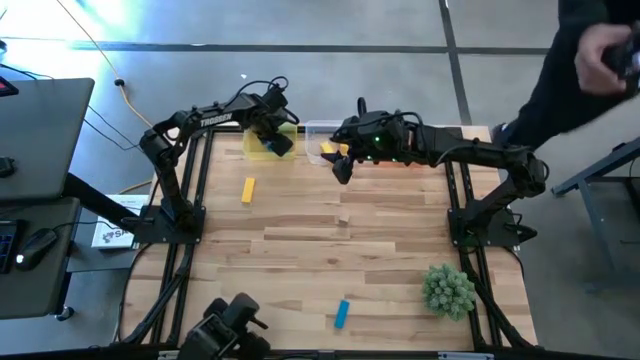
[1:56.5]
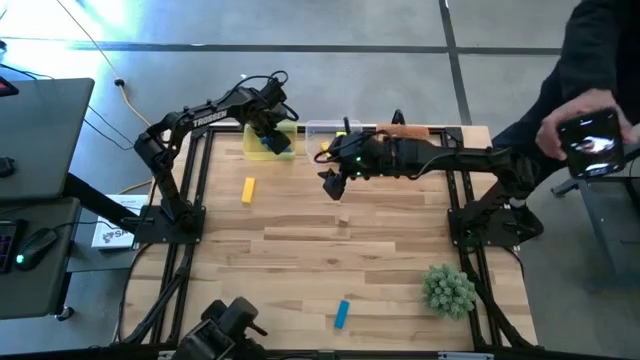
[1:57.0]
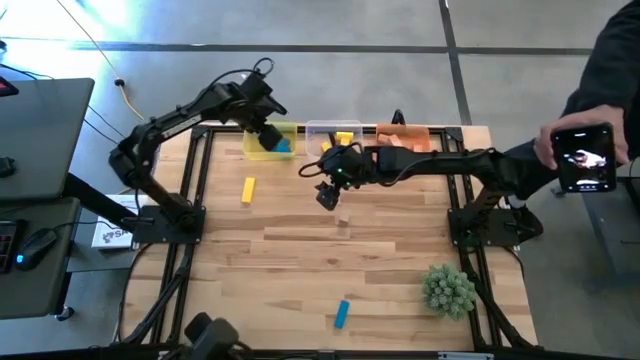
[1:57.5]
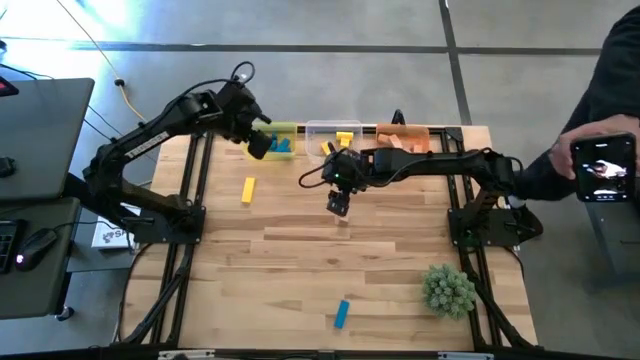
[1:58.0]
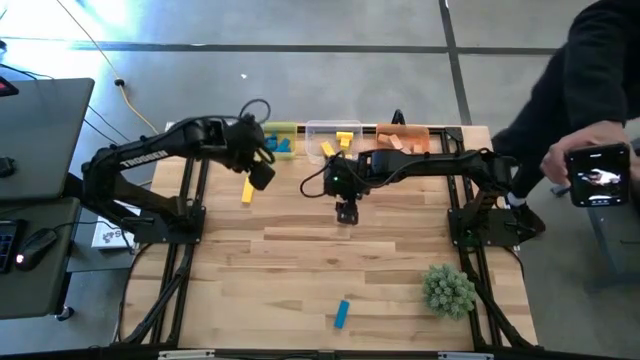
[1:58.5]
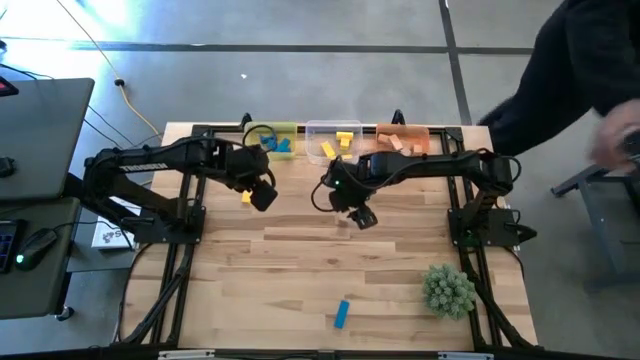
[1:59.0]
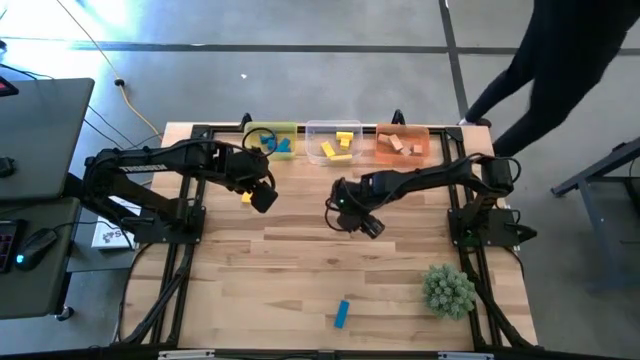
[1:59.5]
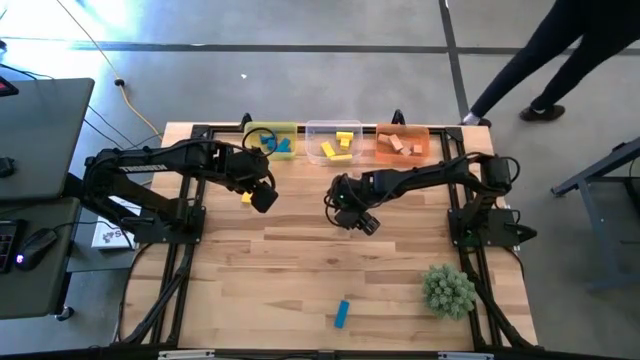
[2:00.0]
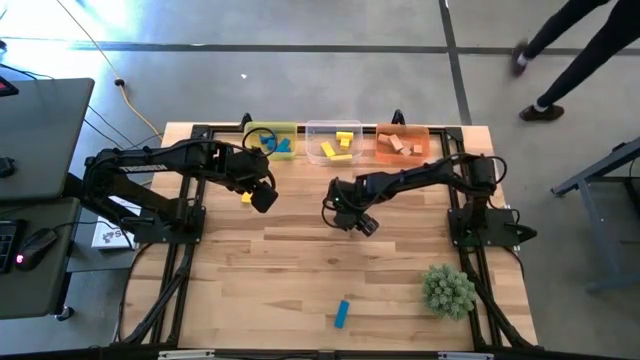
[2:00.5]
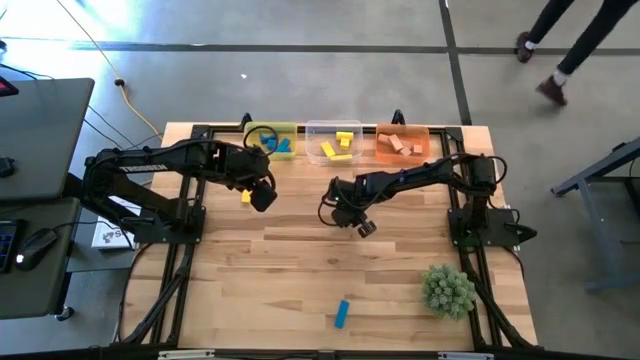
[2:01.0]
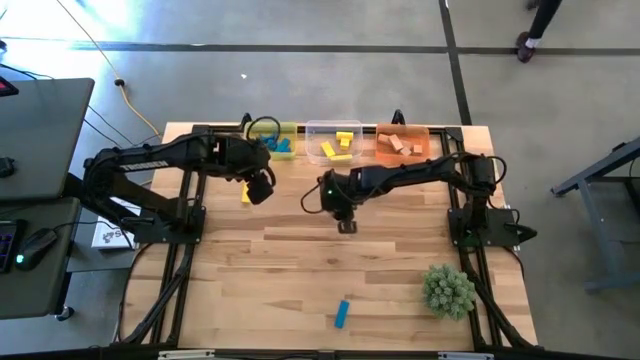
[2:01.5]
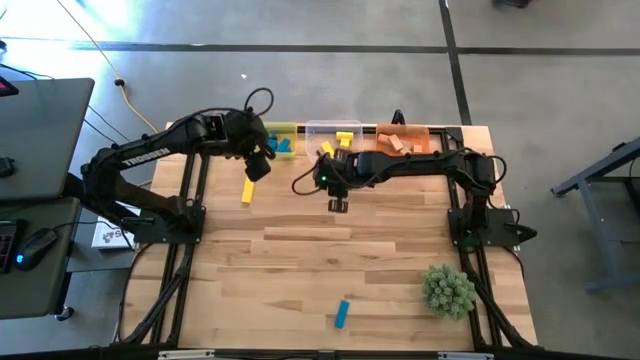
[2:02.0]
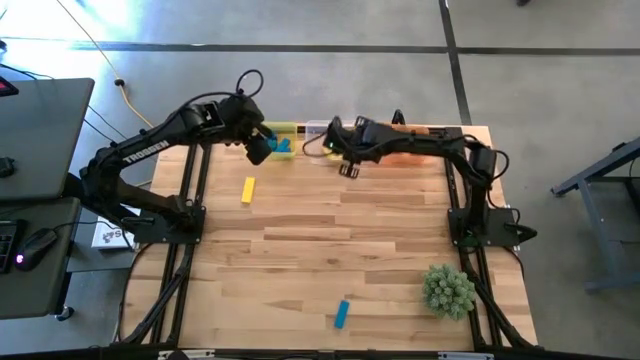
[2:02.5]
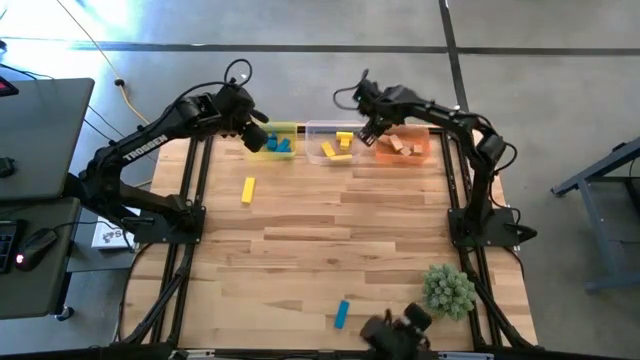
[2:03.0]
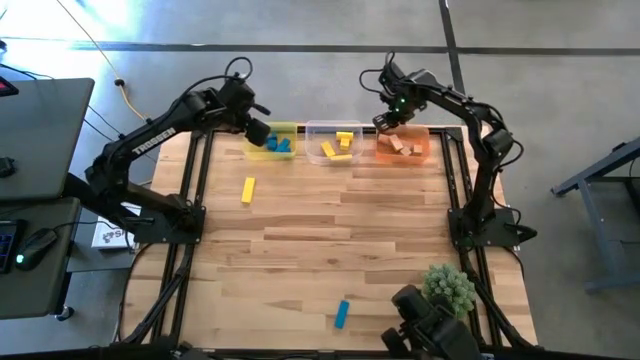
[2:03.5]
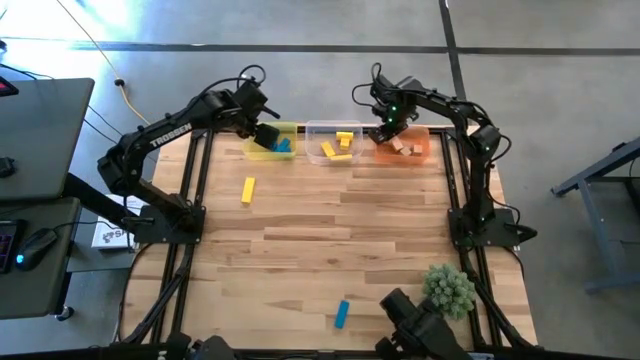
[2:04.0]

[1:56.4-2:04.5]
Task: Sort & place blocks by color
Put the brown block into the orange bin

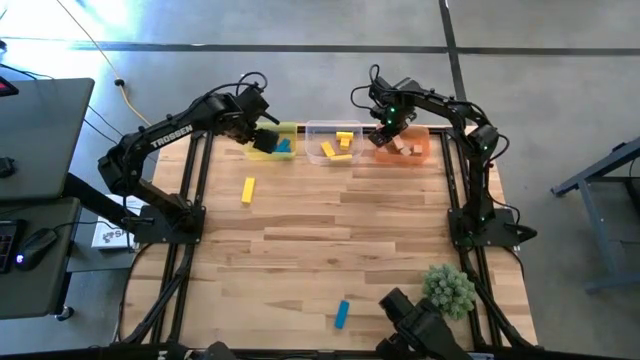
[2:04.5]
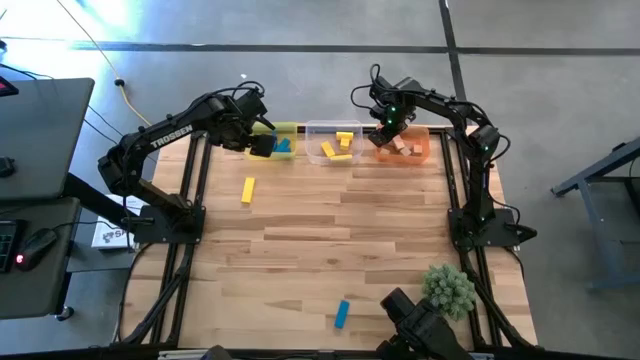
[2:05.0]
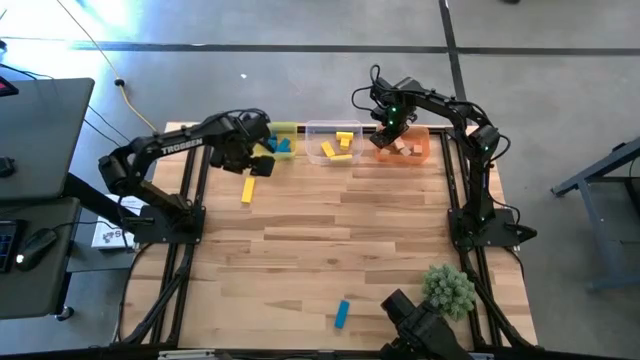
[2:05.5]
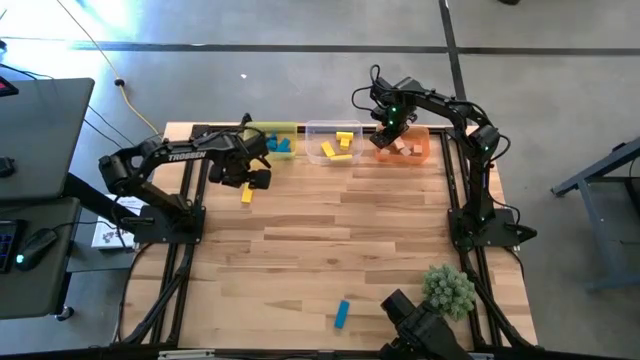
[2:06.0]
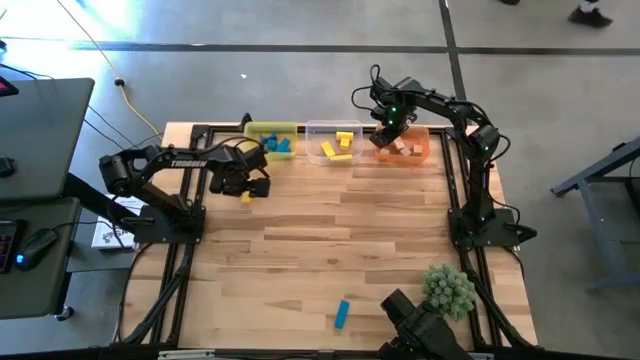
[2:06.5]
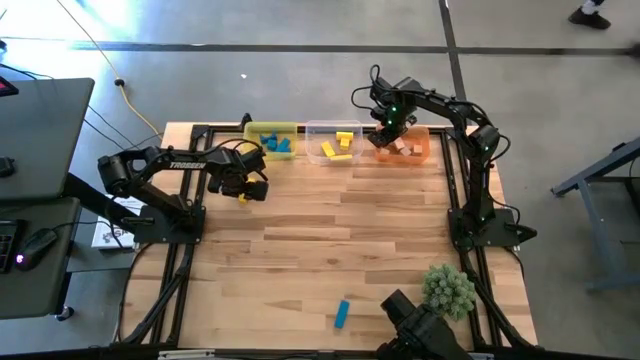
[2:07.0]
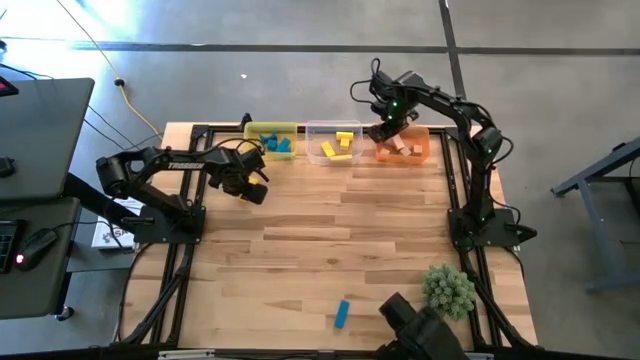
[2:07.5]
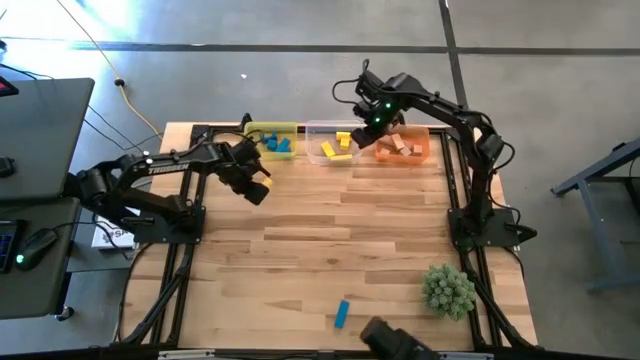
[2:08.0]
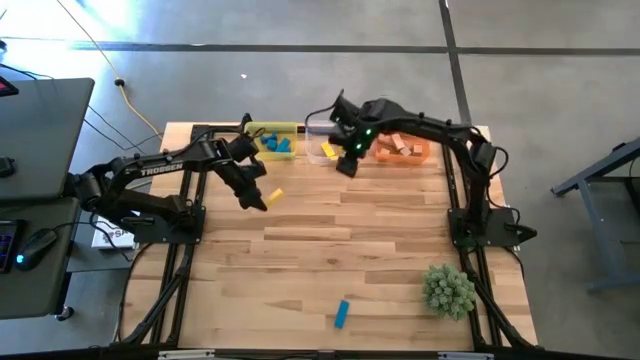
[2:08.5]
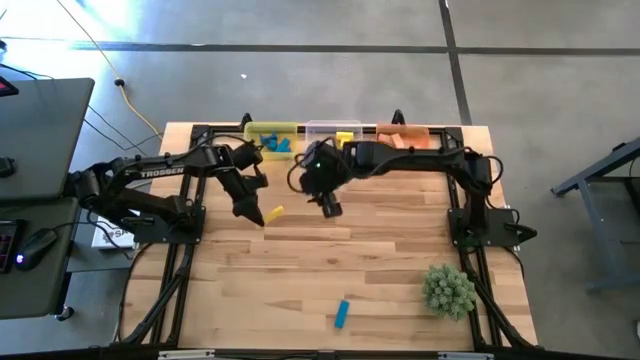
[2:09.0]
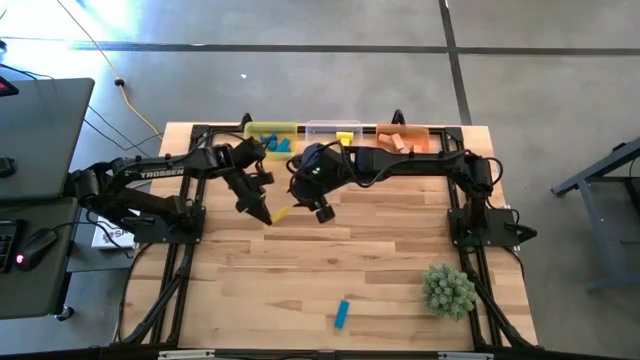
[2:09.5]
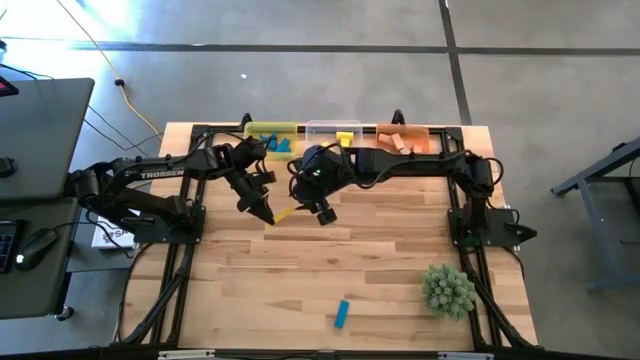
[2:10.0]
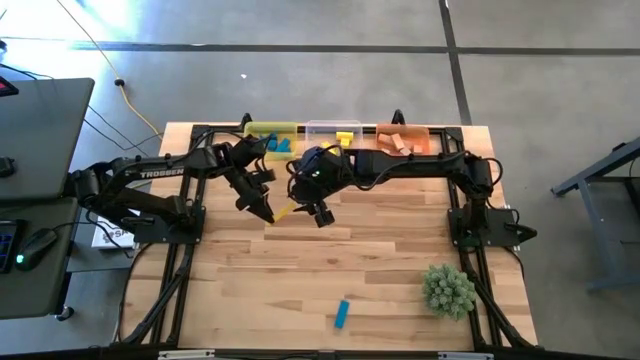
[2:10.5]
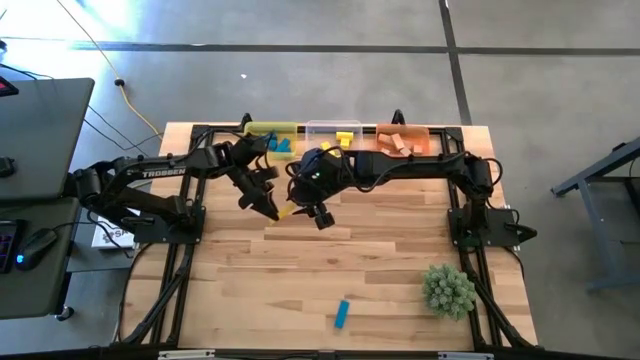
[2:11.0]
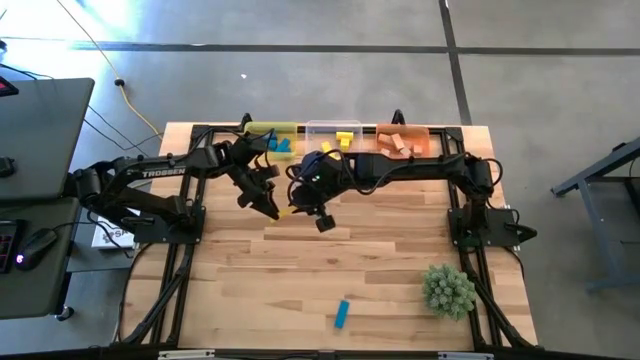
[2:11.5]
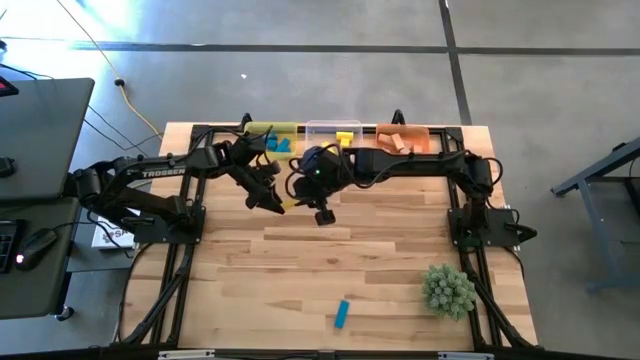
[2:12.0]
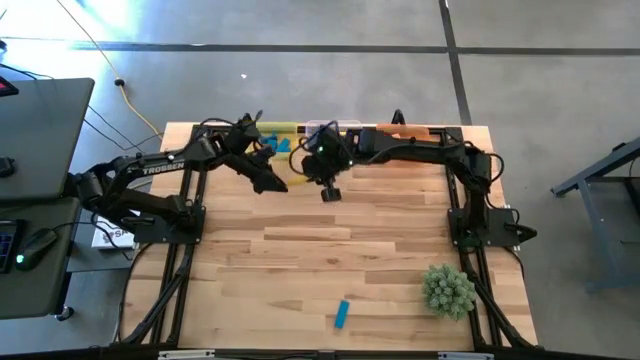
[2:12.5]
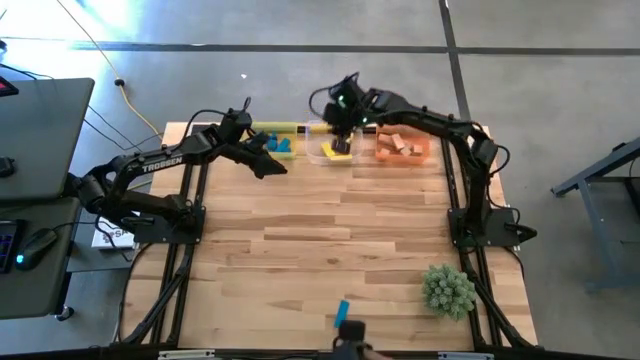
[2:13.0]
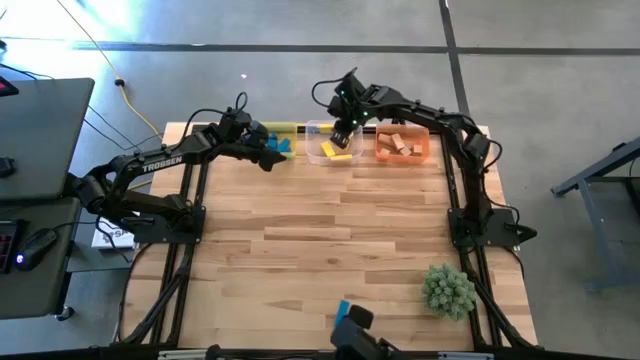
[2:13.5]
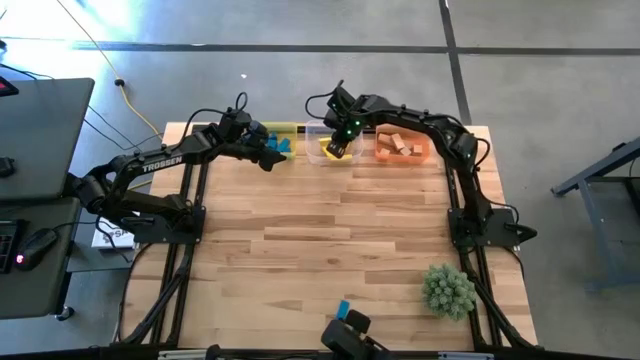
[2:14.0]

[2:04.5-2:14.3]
Put the yellow block into the transparent bin

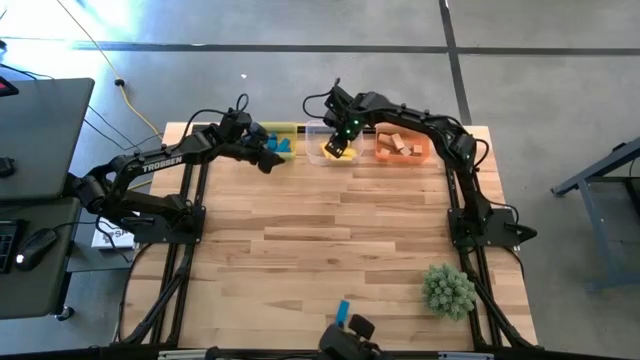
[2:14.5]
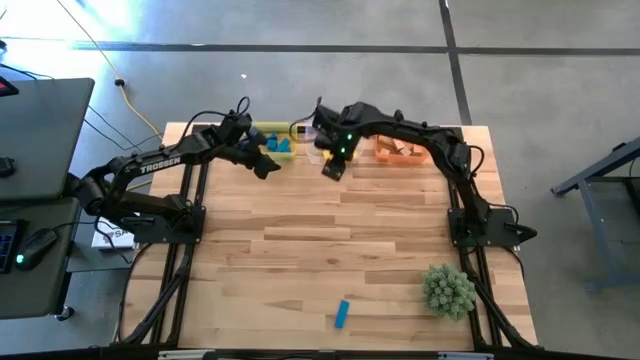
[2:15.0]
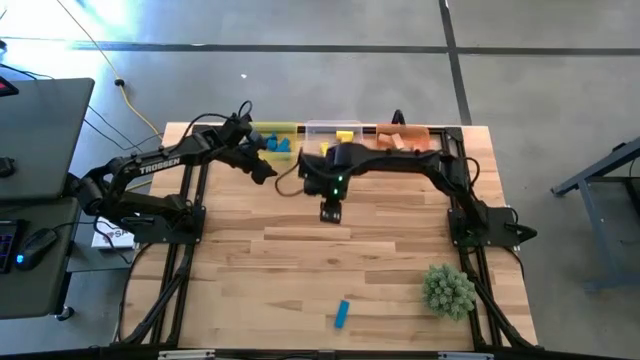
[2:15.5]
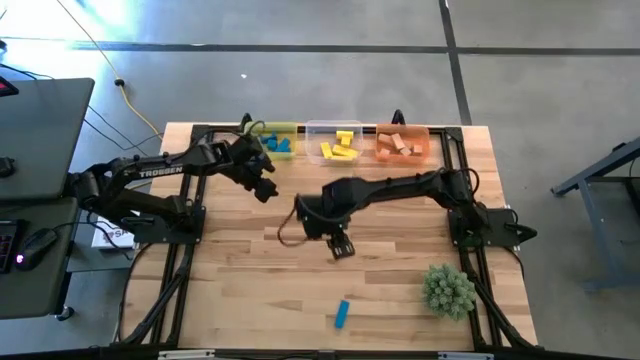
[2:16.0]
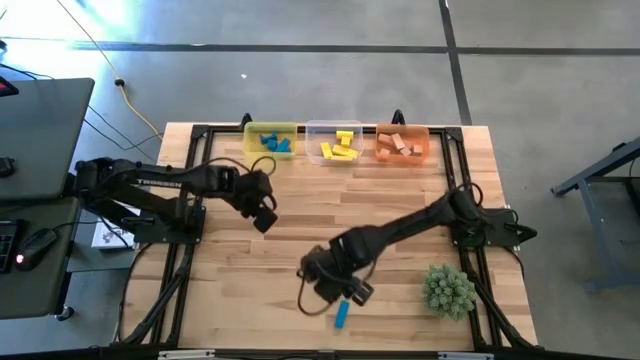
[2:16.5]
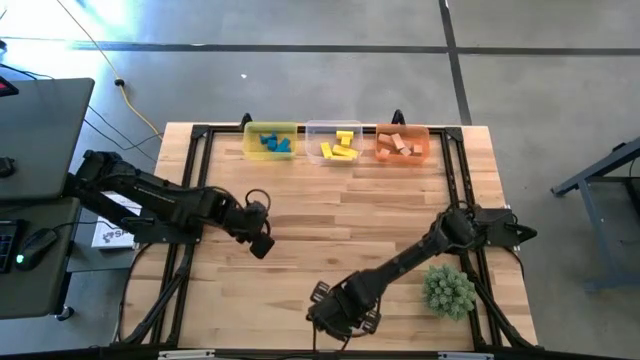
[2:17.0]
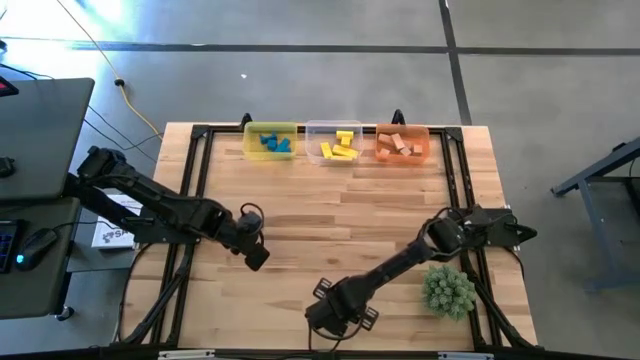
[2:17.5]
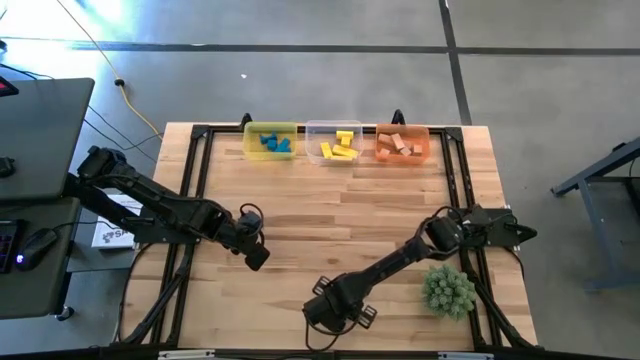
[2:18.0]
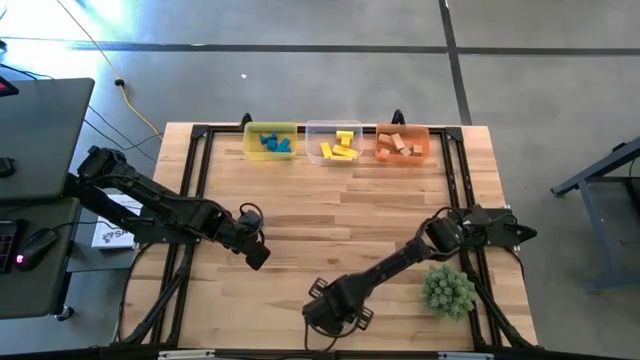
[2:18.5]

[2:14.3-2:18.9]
Put the blue block into the yellow bin
